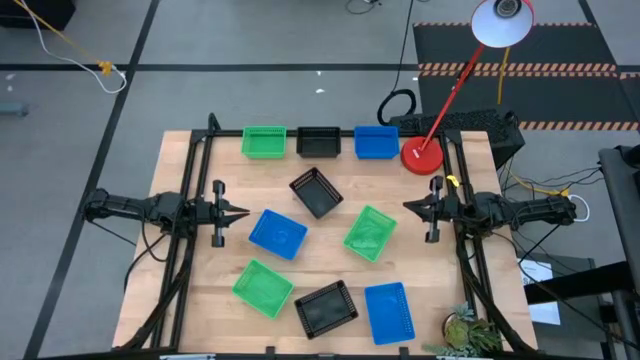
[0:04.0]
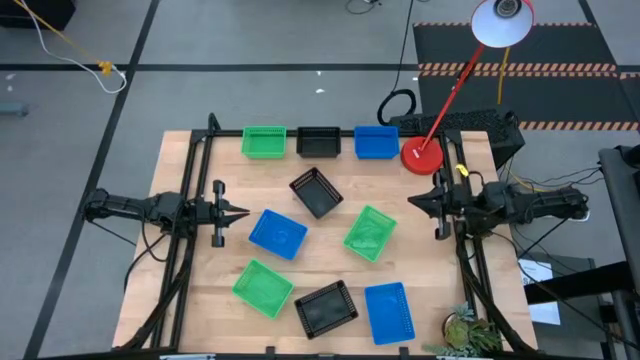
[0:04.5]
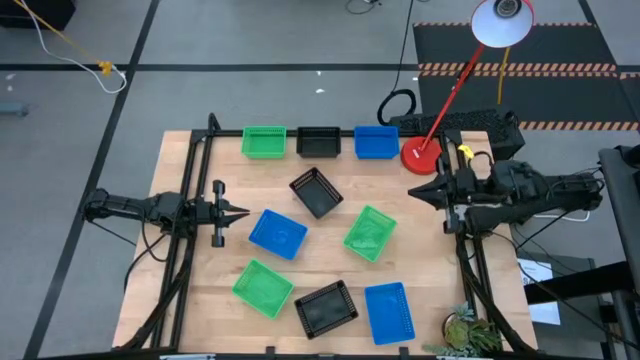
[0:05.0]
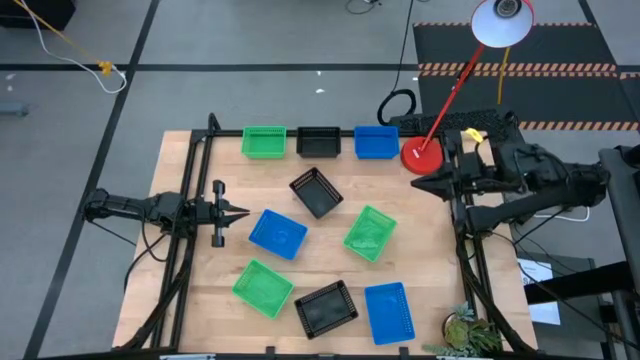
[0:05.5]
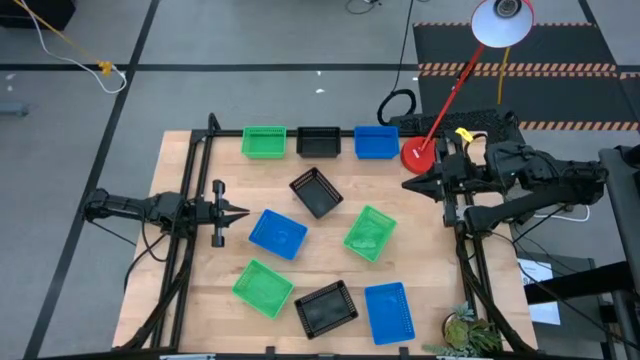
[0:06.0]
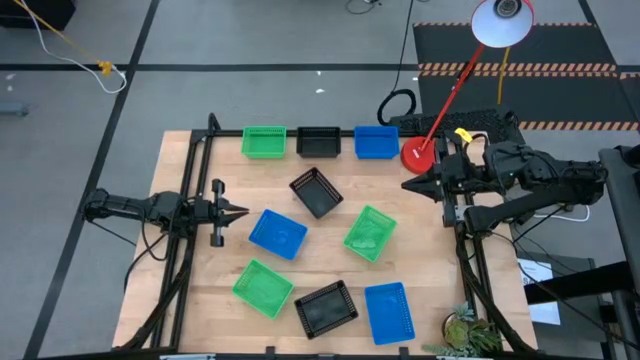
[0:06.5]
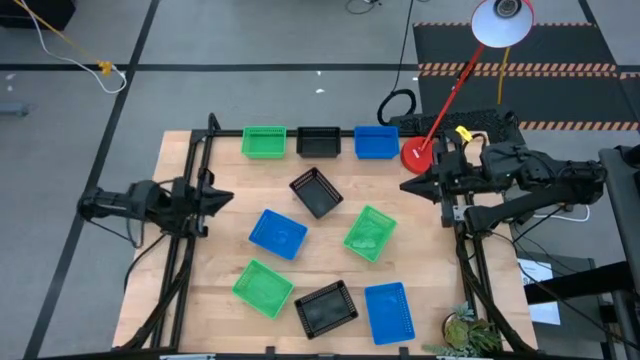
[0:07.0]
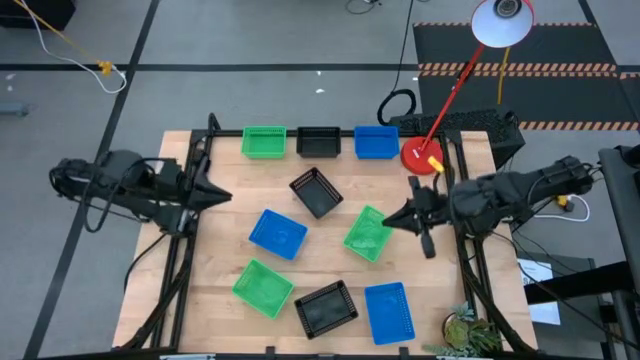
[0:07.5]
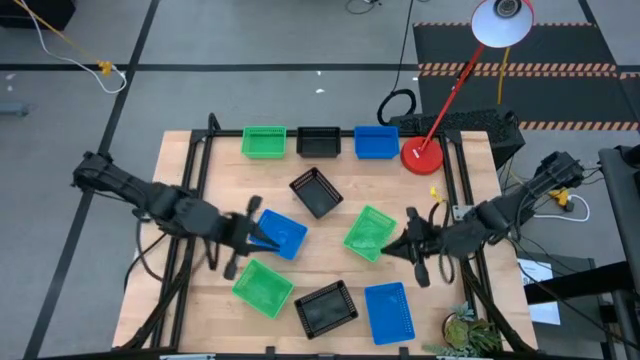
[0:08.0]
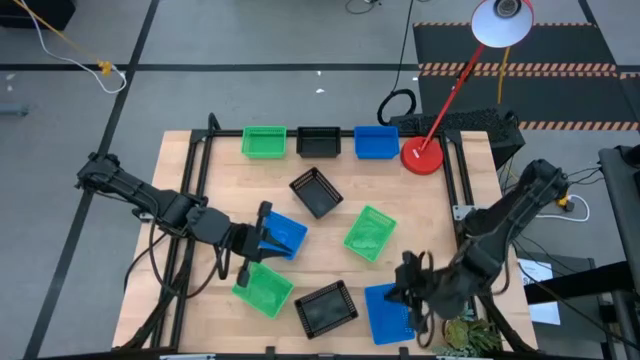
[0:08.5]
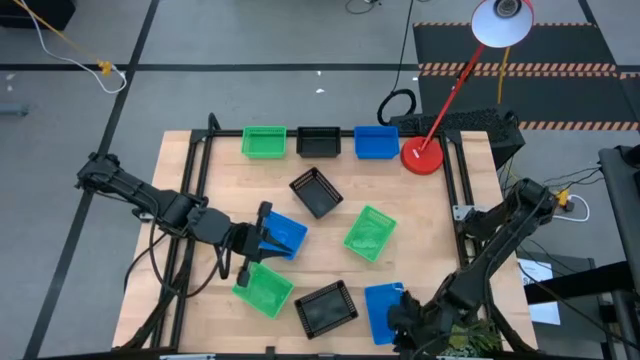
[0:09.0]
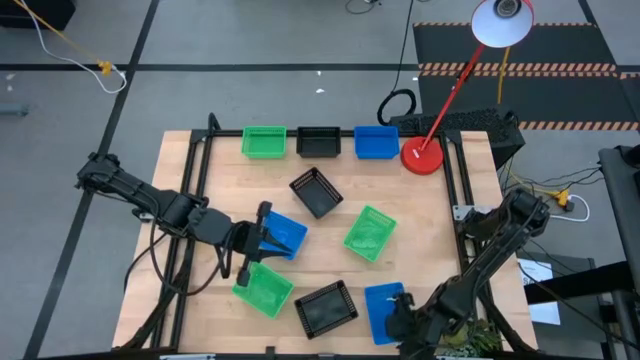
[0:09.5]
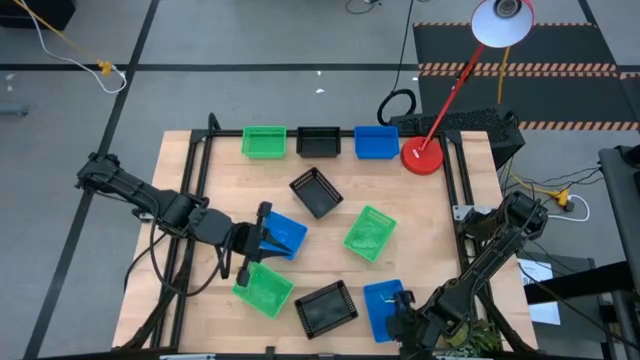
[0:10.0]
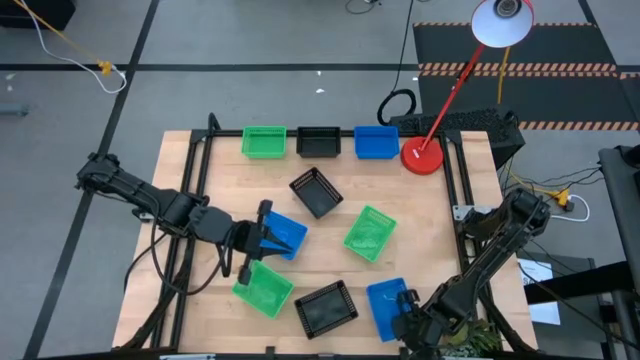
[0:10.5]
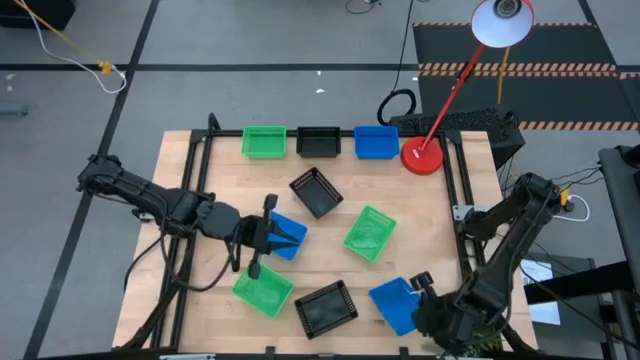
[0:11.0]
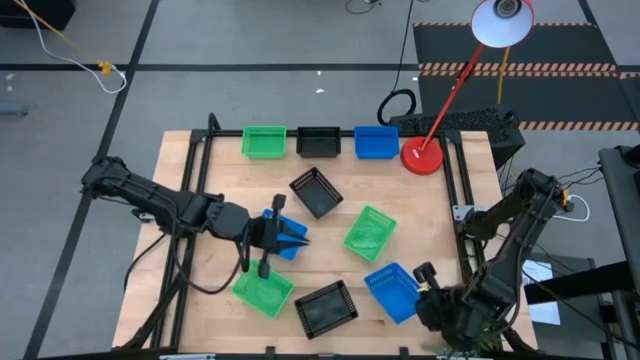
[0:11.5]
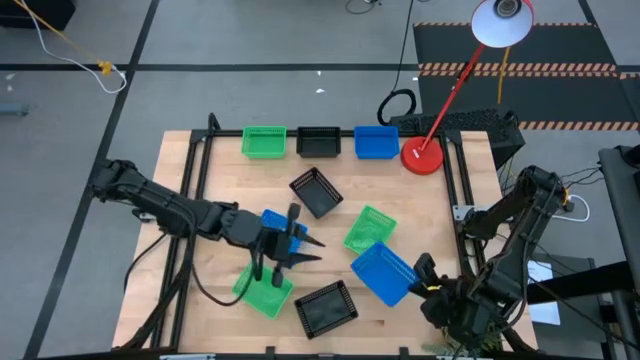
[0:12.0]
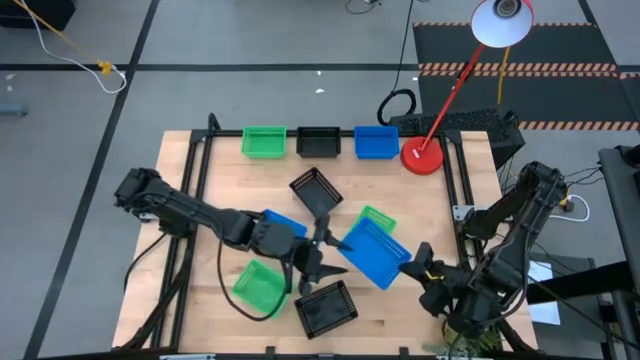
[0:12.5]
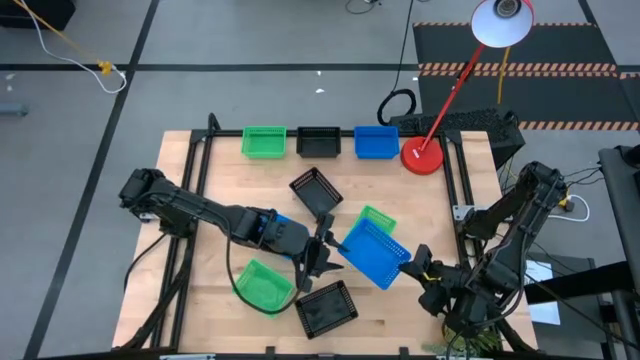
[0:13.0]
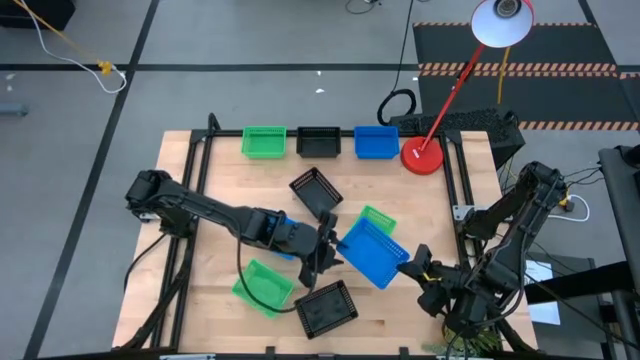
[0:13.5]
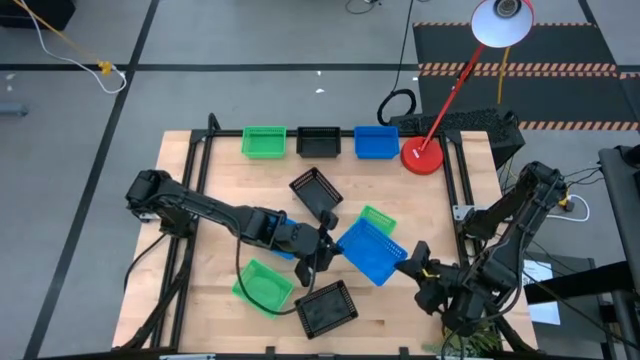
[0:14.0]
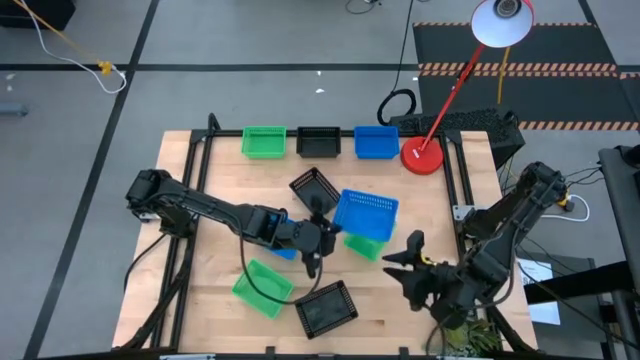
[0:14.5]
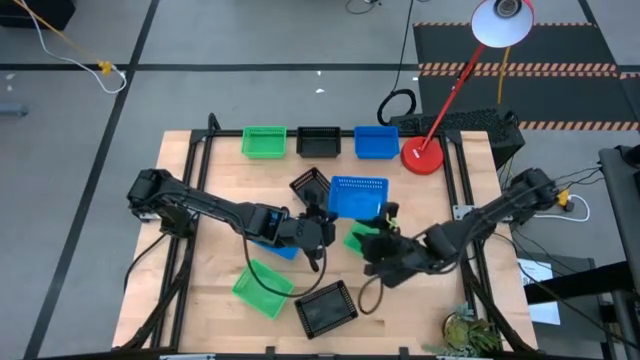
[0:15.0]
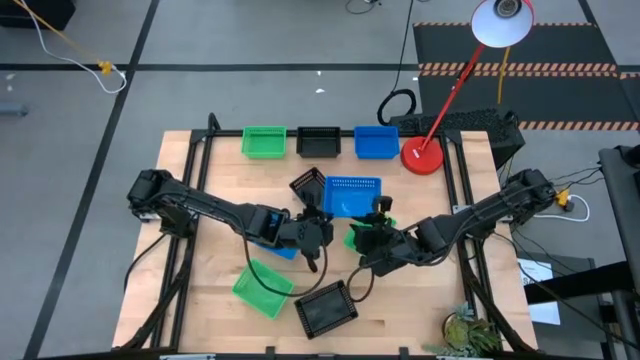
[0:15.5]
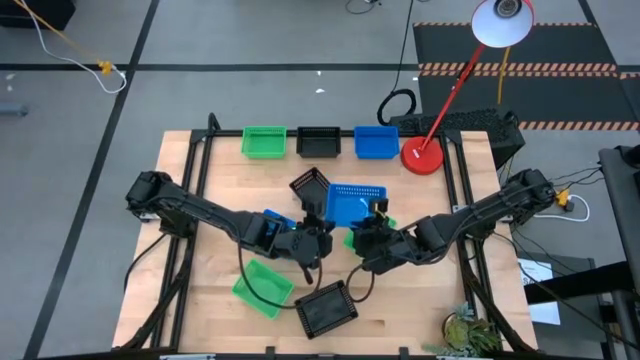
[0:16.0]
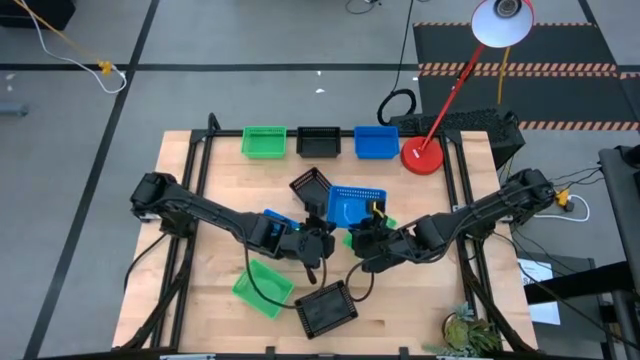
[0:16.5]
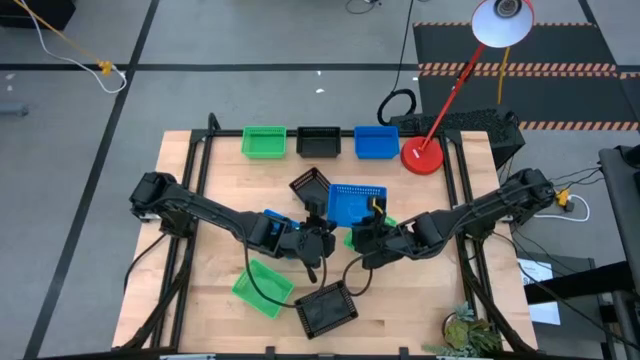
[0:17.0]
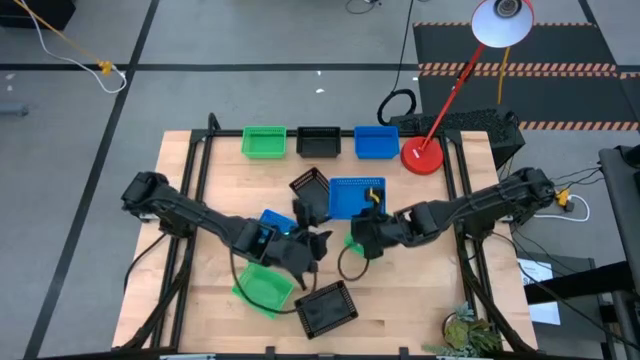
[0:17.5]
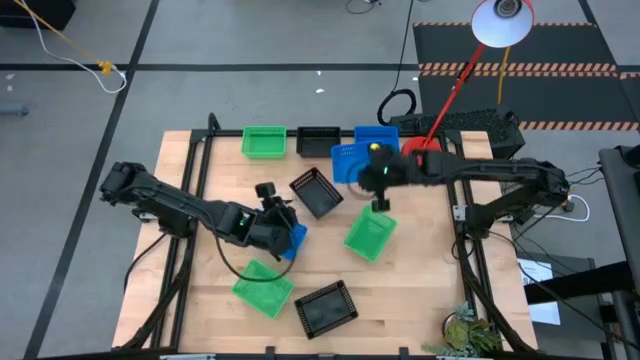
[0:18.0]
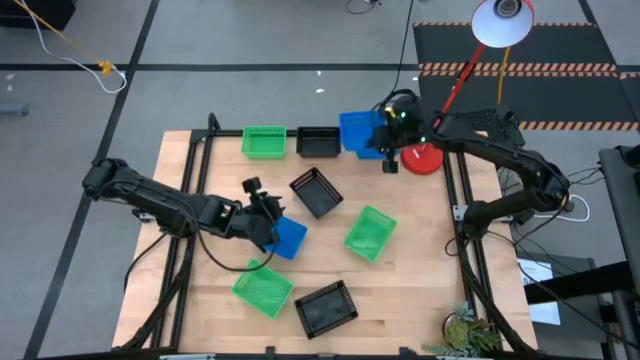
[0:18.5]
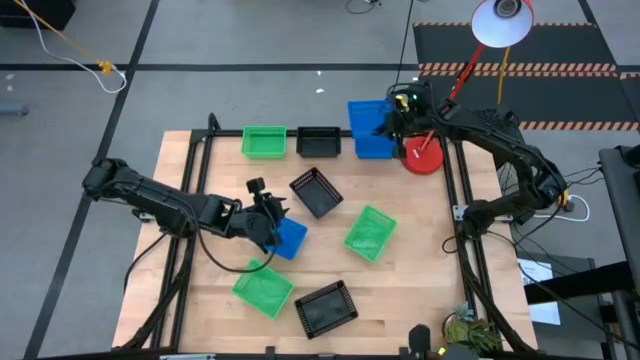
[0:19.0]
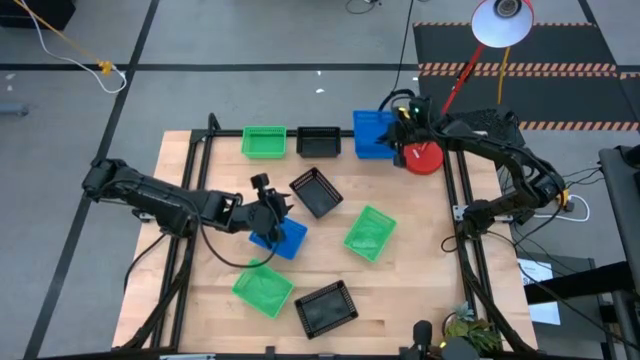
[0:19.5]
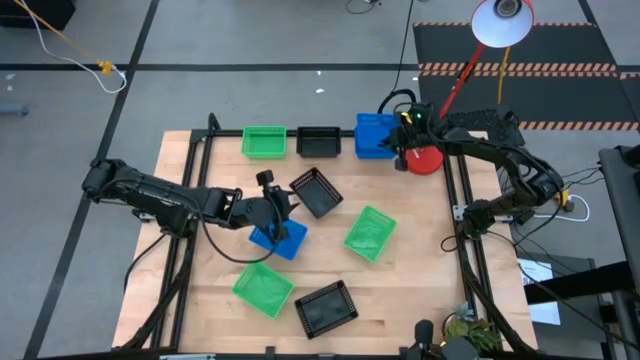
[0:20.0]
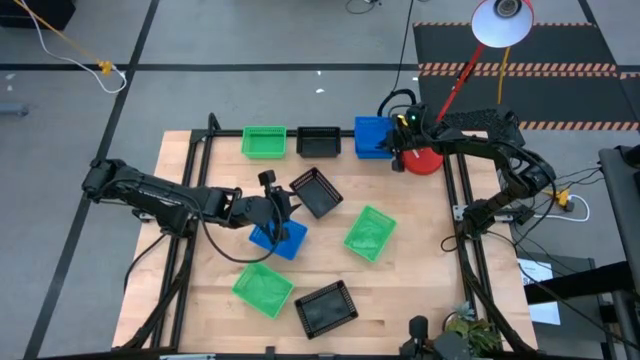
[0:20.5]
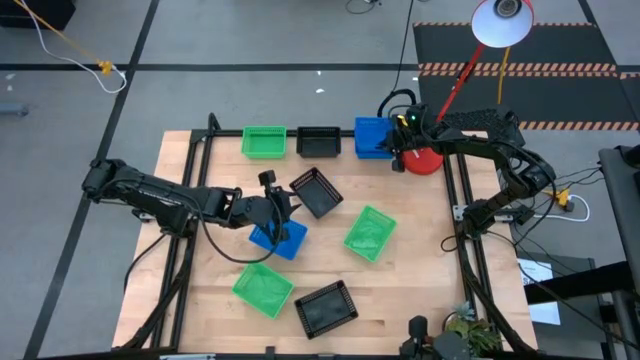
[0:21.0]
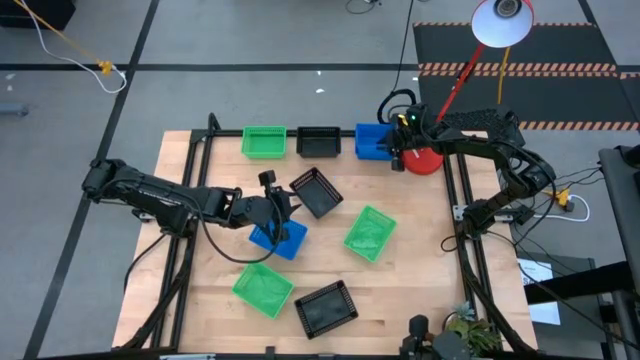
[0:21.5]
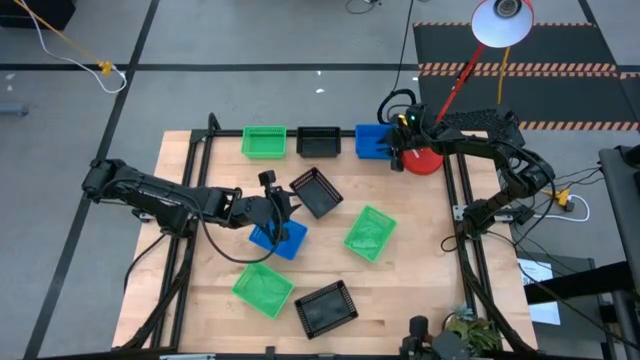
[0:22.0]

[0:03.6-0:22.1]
Stack the bottom blue bin on the top blue bin

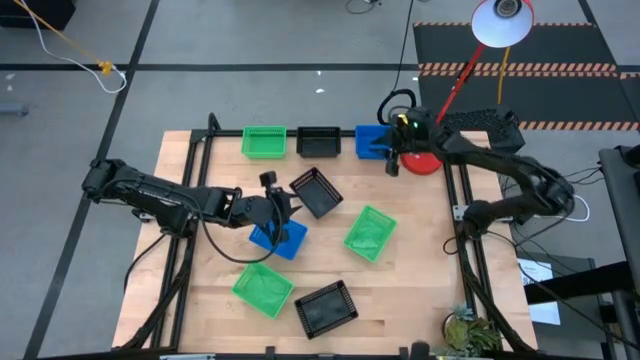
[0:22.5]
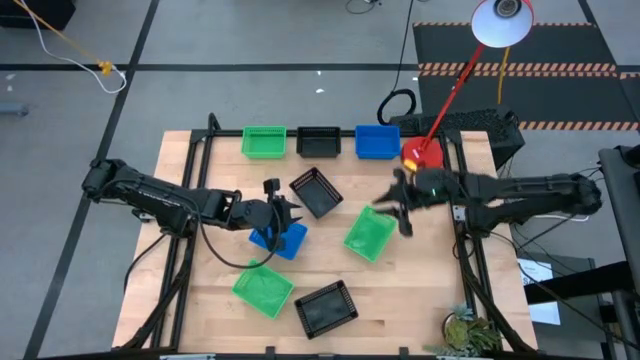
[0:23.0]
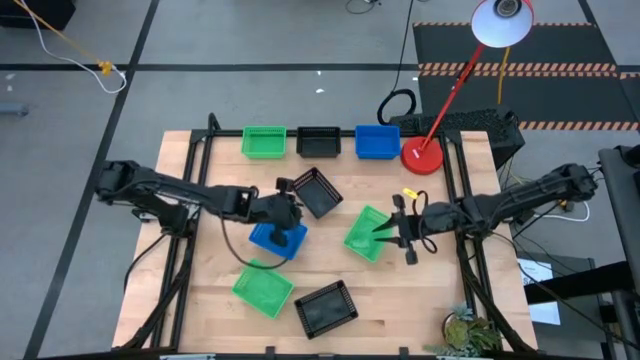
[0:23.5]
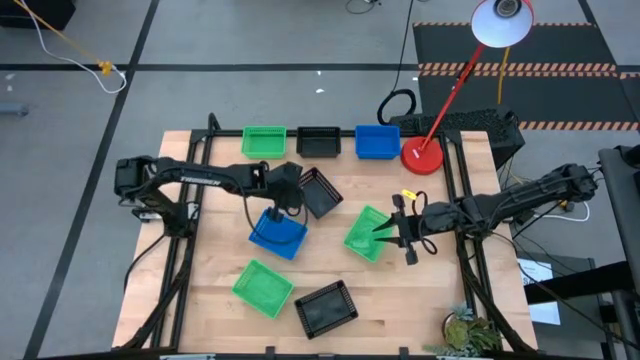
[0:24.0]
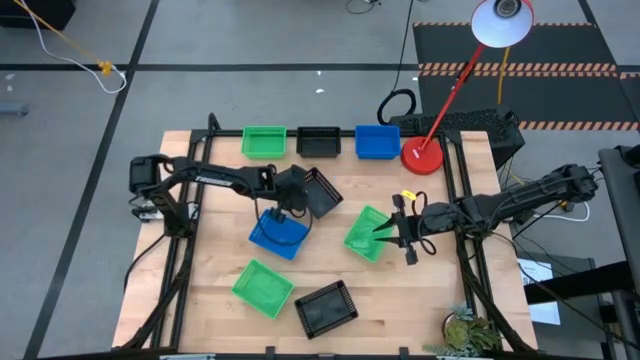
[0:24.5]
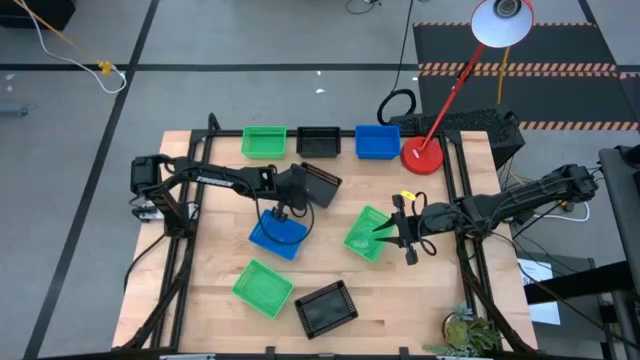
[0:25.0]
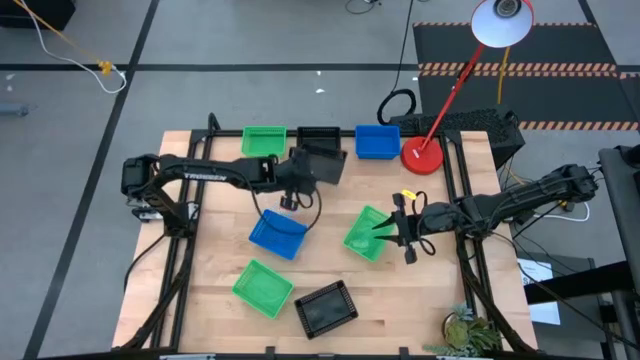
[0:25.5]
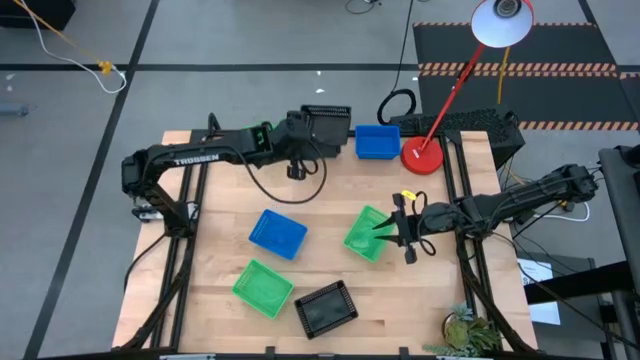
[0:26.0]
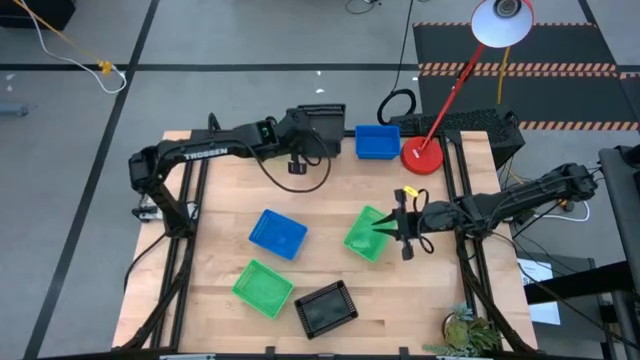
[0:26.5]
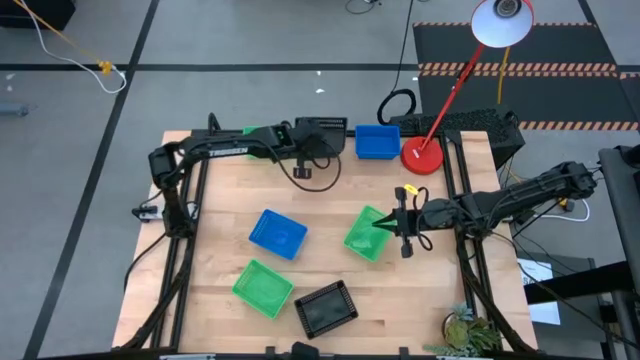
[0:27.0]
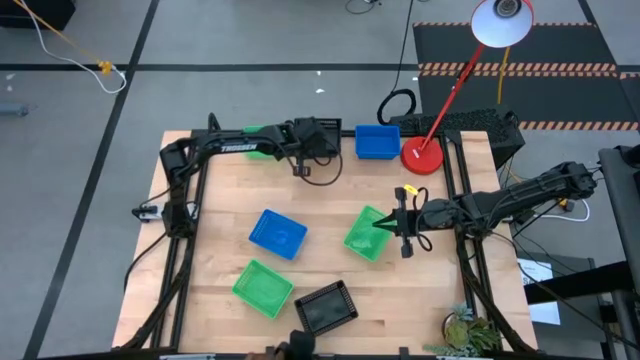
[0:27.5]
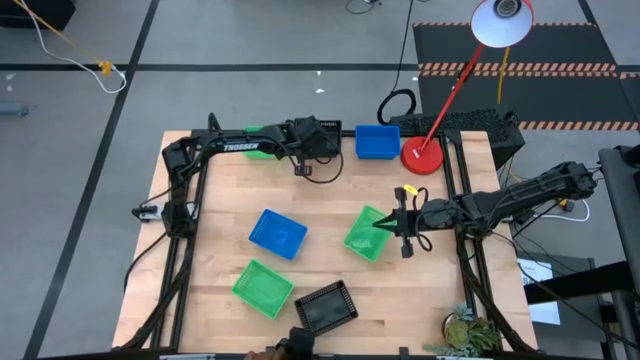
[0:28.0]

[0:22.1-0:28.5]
Stack the middle black bin on the top black bin
